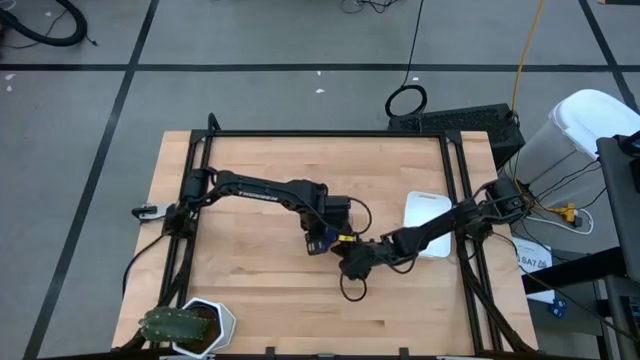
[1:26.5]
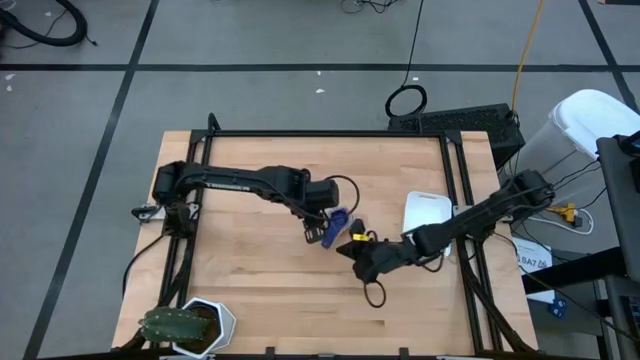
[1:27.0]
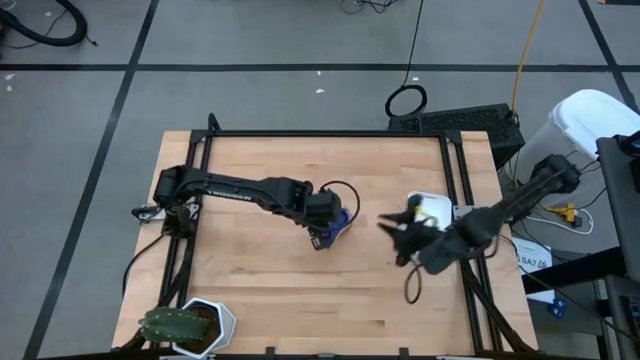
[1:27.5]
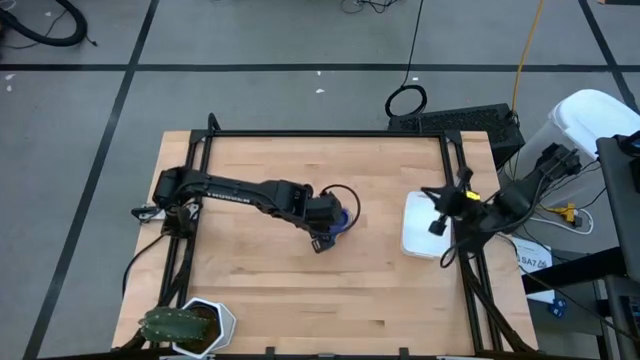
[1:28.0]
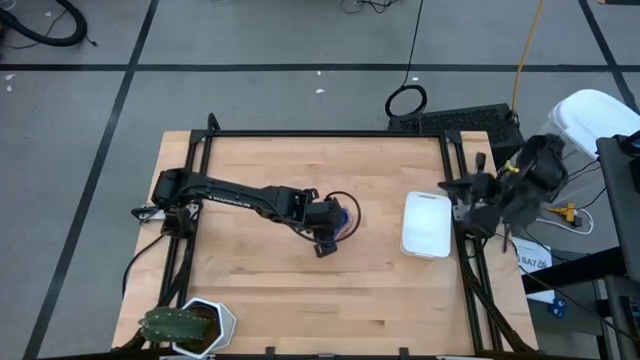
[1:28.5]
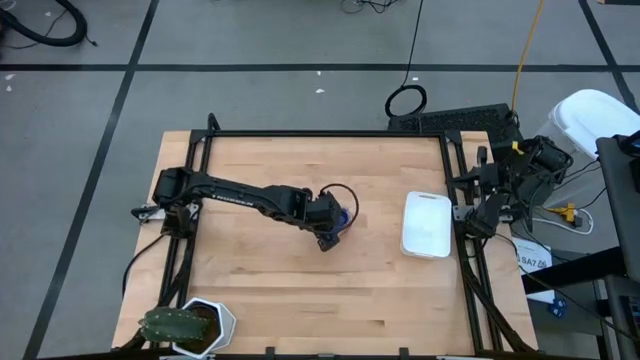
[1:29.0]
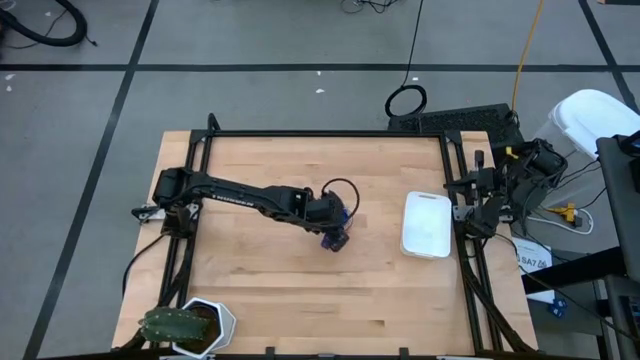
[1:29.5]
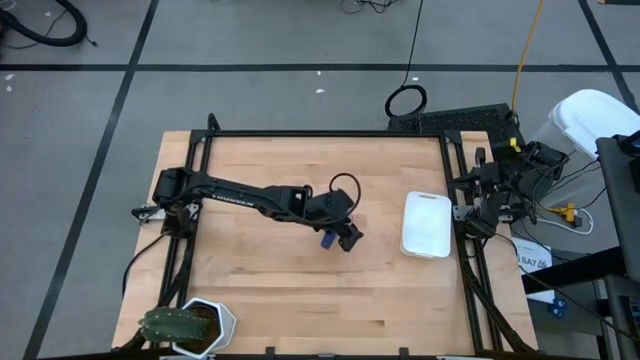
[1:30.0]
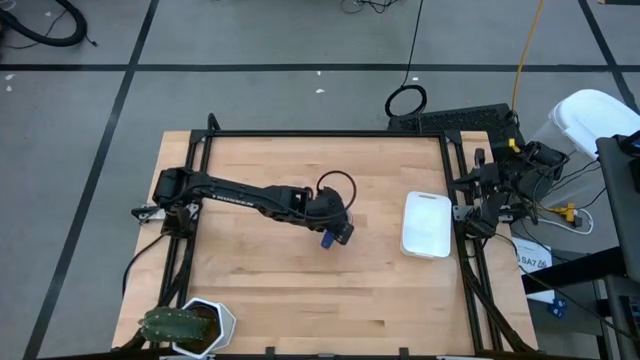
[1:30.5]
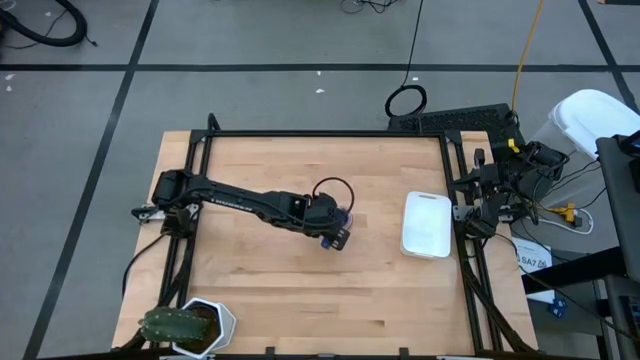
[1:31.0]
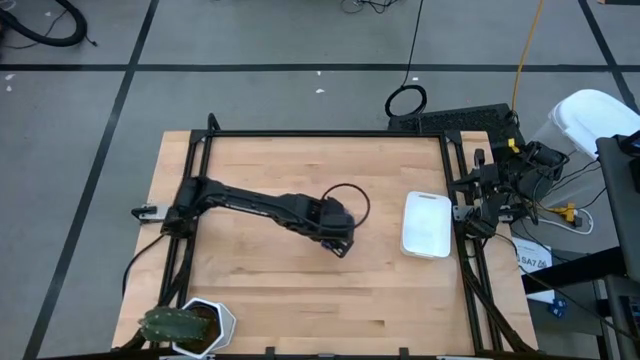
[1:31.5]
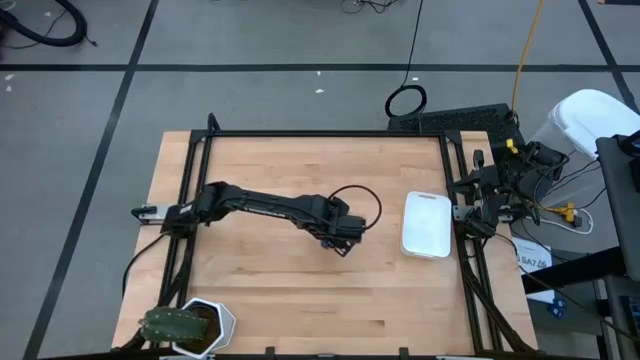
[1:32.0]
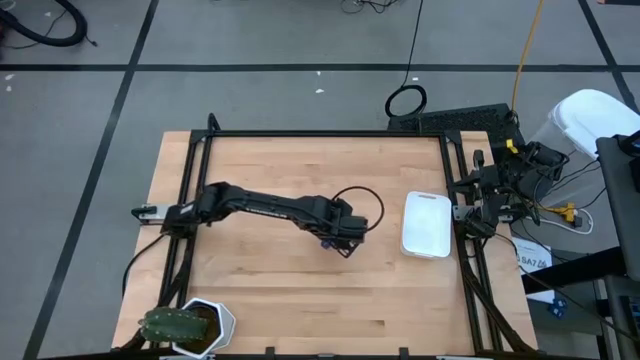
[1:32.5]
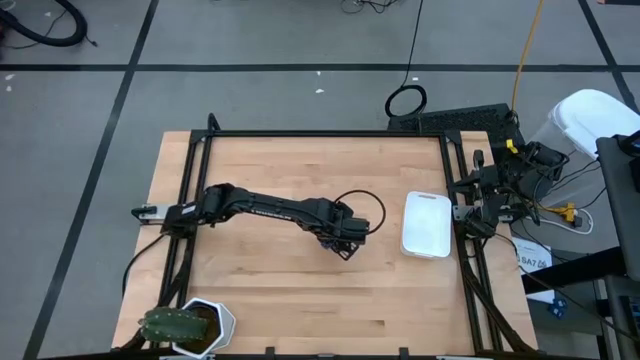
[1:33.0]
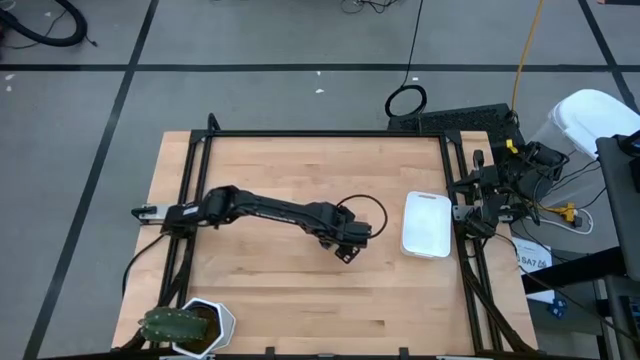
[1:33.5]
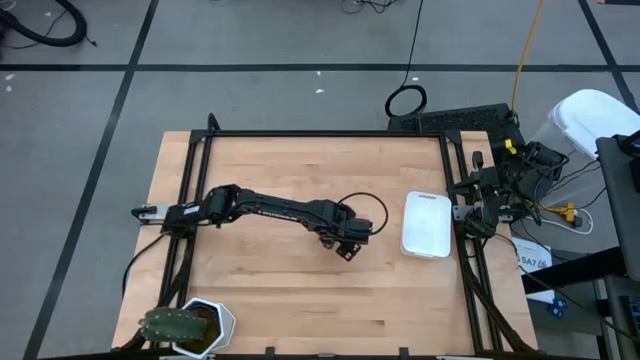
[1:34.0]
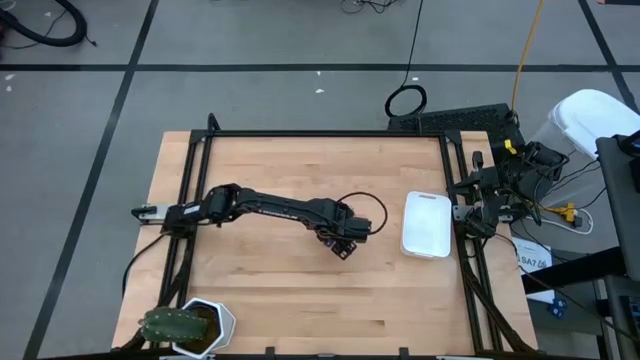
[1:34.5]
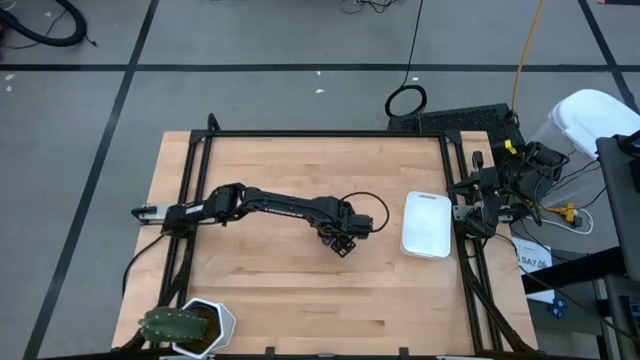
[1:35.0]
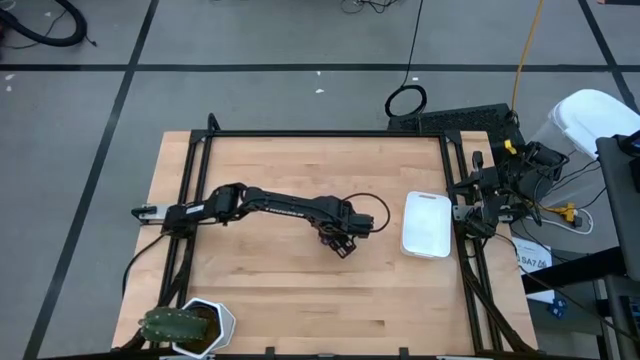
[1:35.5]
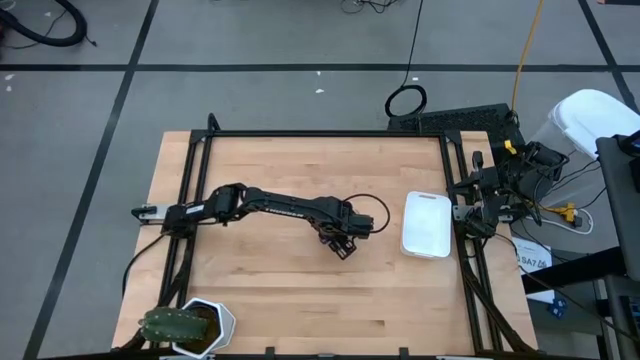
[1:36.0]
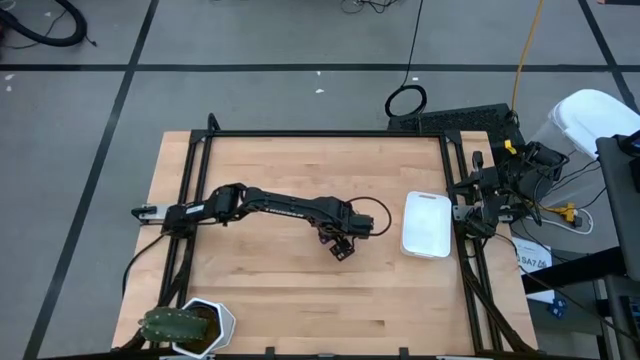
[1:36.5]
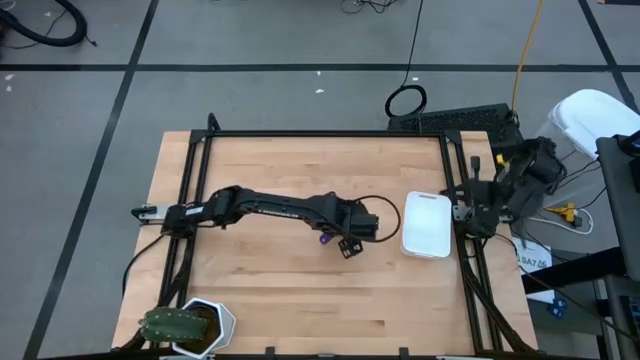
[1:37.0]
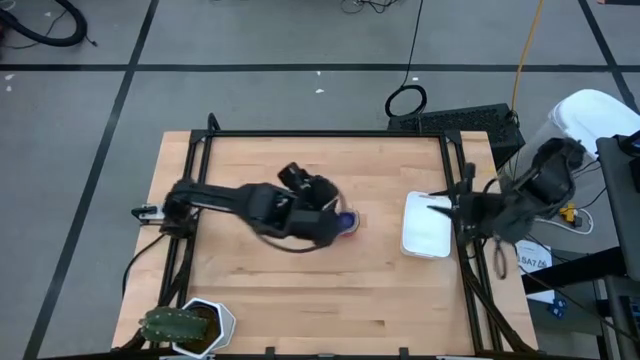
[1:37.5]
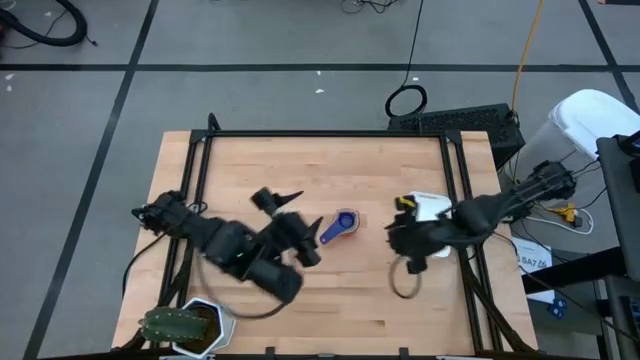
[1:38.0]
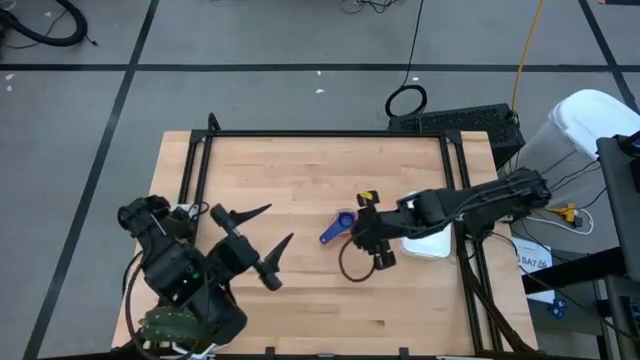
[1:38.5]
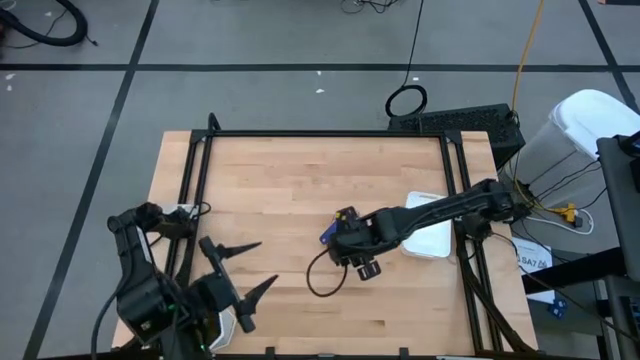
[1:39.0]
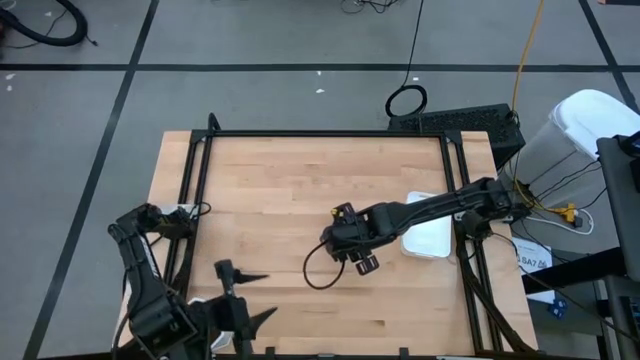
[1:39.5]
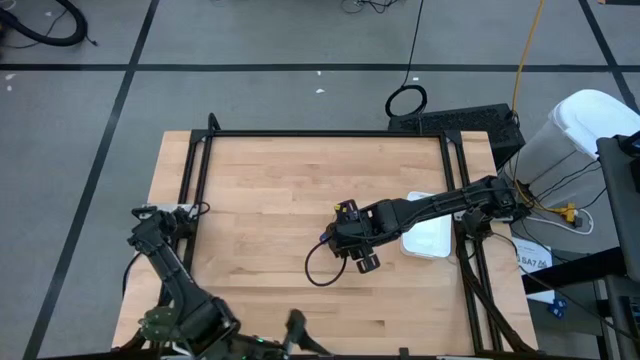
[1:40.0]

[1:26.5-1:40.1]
Task: Nest measuring cups in basket
Put the nested measuring cups into the white bin

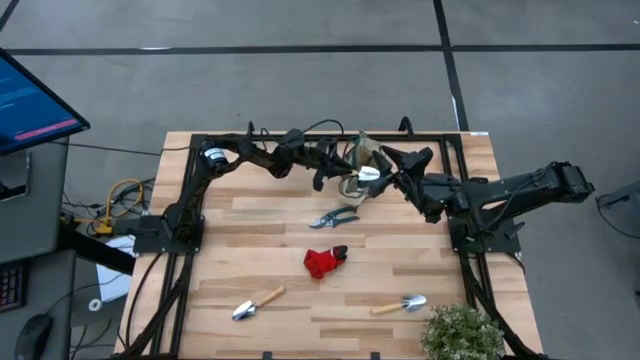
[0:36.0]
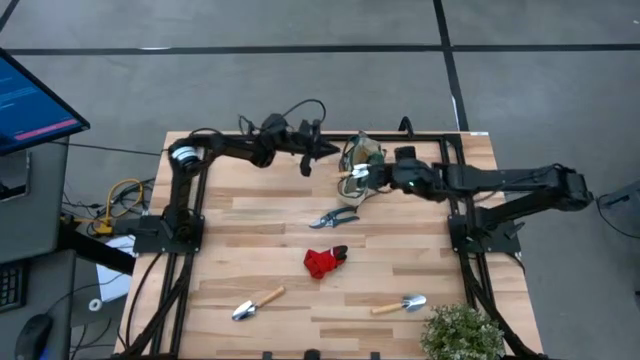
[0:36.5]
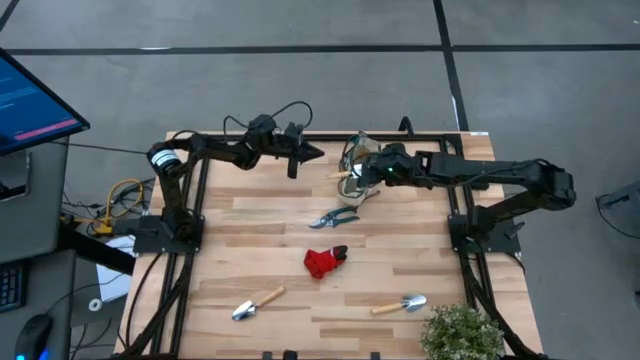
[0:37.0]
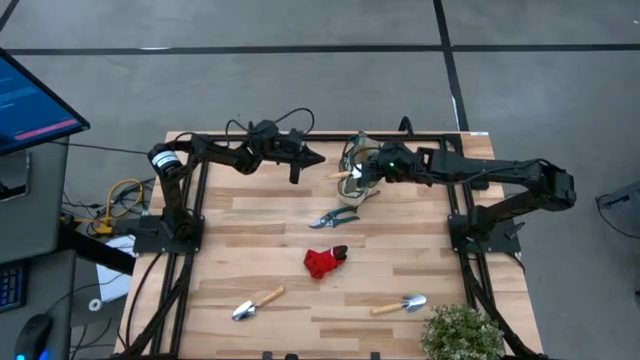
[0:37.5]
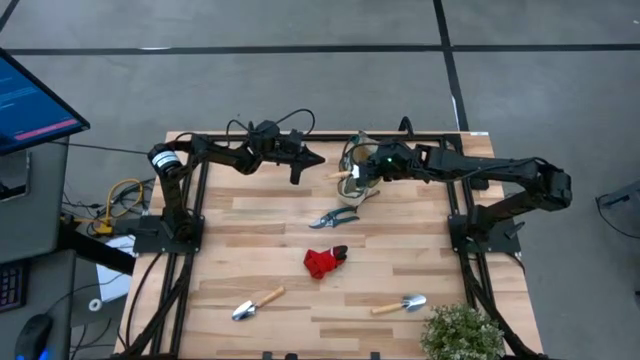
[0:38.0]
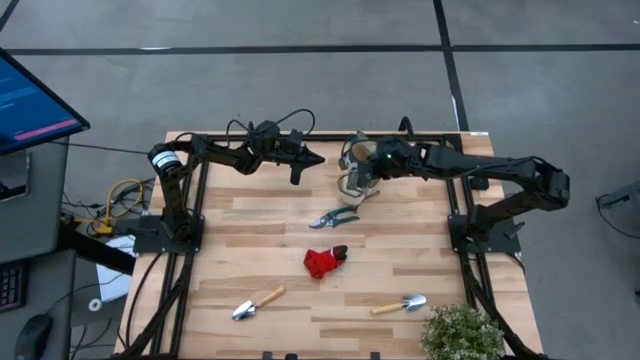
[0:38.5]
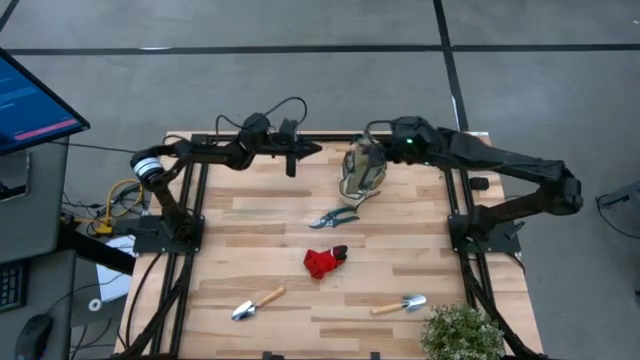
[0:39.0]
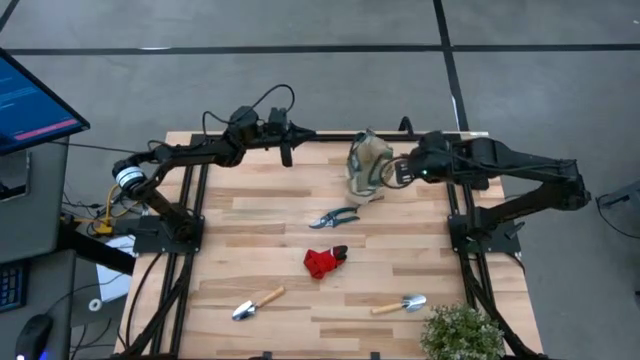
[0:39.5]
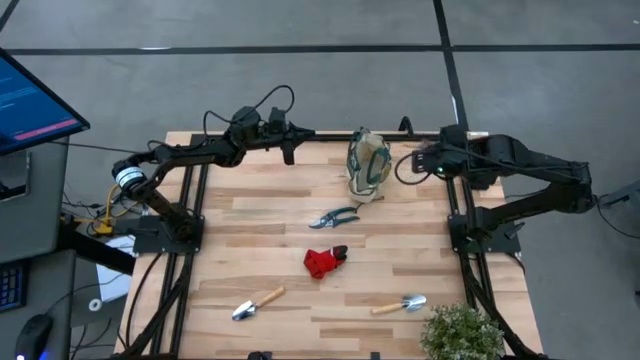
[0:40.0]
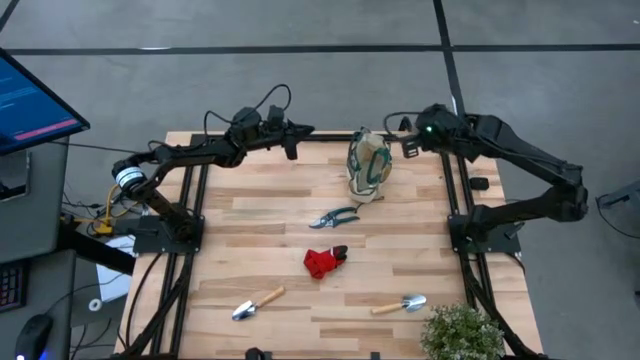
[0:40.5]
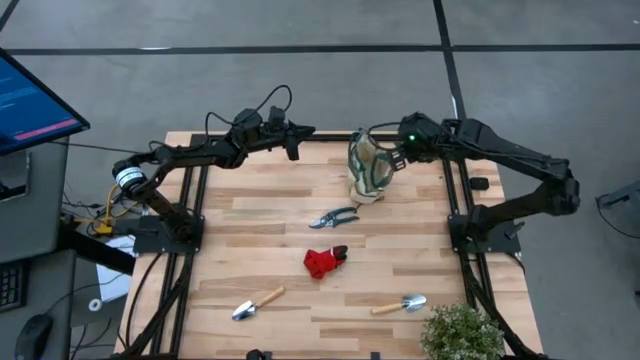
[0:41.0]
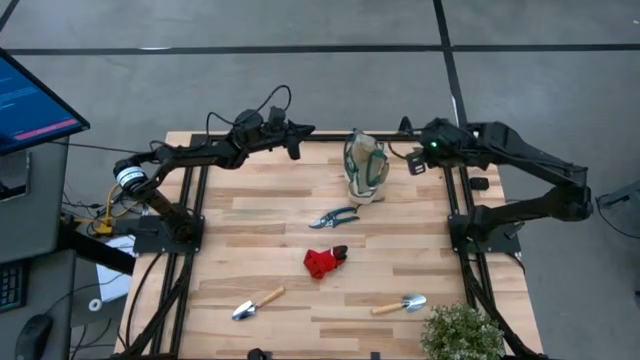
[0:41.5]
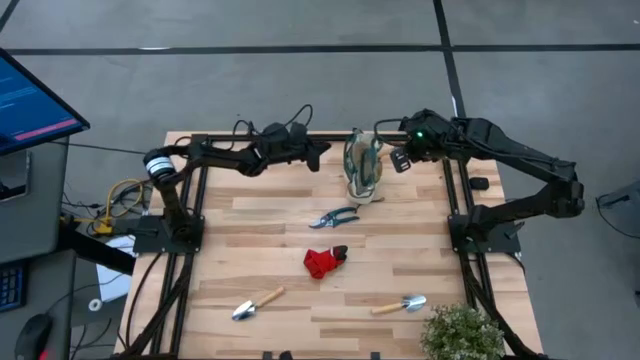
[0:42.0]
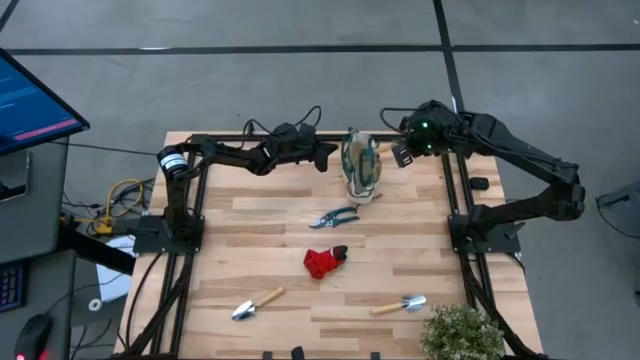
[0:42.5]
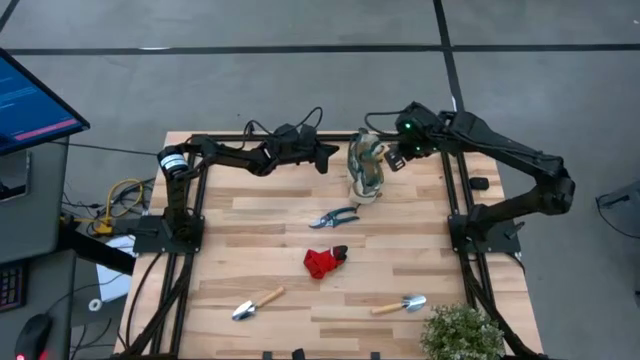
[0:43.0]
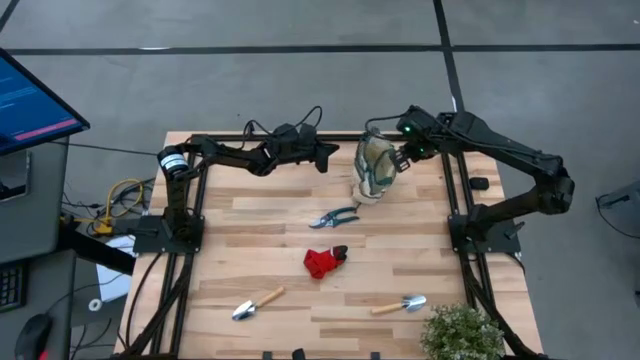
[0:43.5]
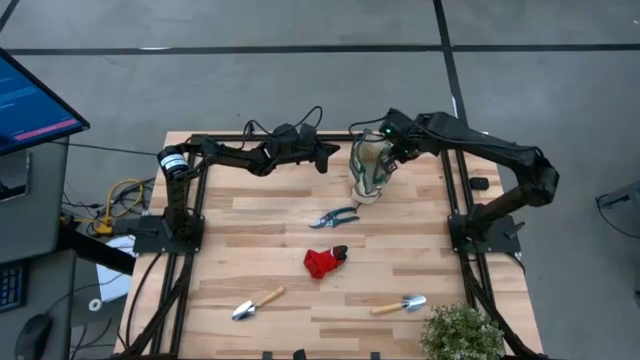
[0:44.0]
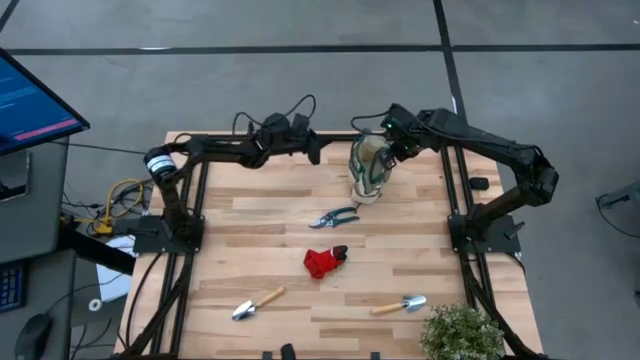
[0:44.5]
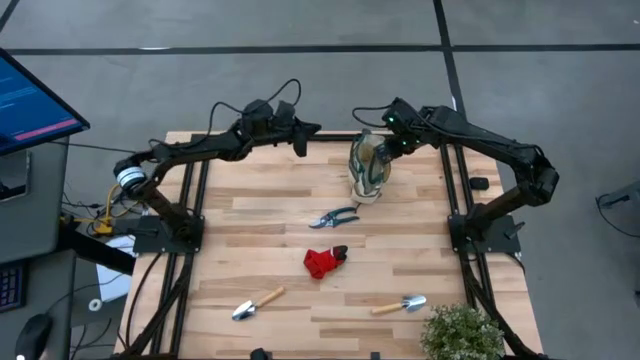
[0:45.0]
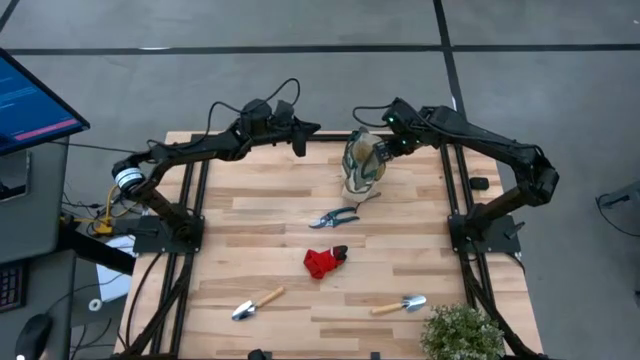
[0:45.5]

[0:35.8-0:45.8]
Task: Pick & Place Garden tools in Gardening bag
Put the trowel into the side pocket of the gardening bag
